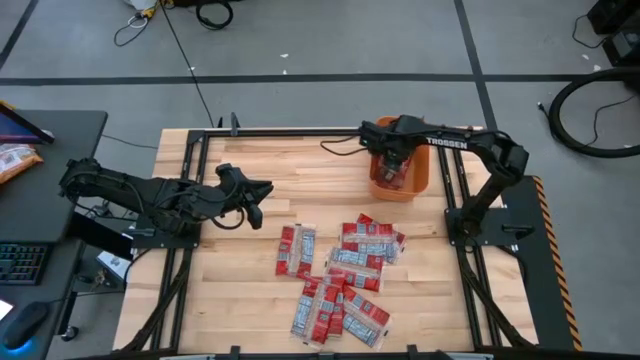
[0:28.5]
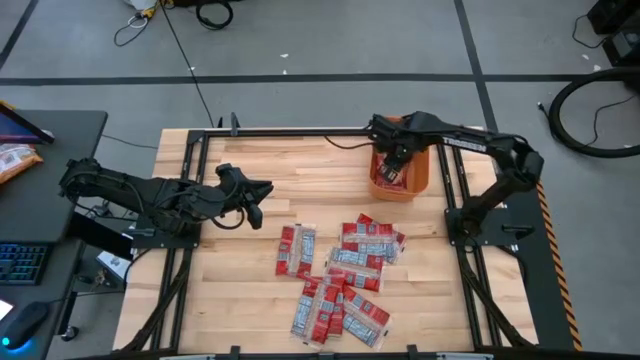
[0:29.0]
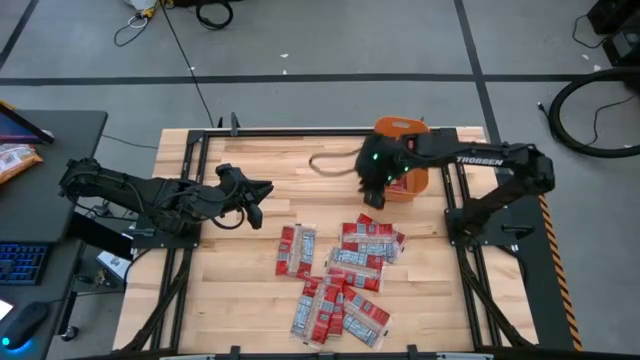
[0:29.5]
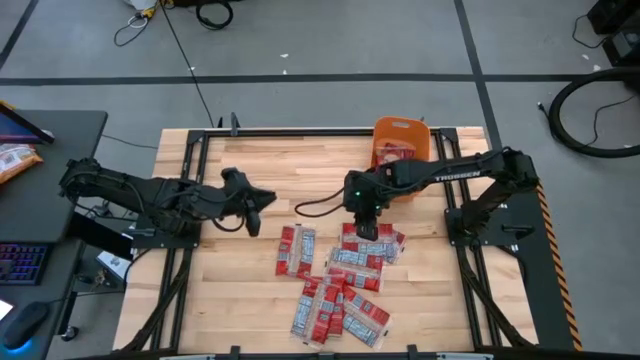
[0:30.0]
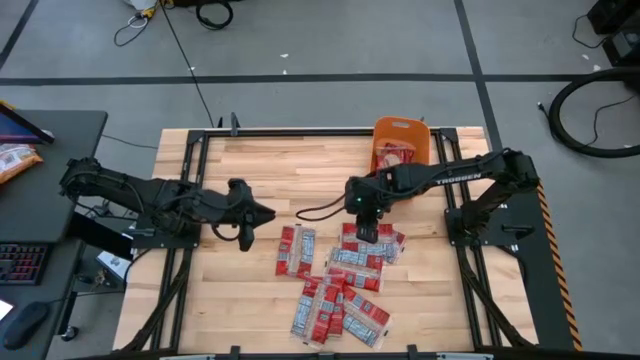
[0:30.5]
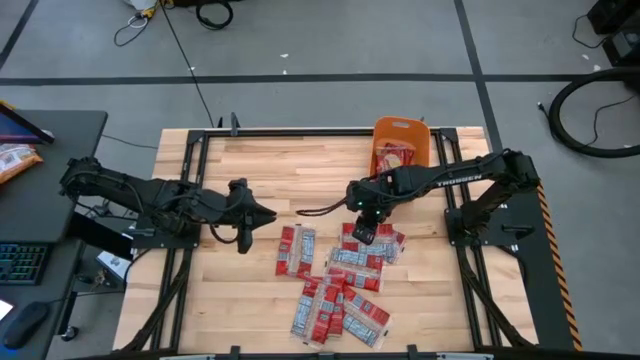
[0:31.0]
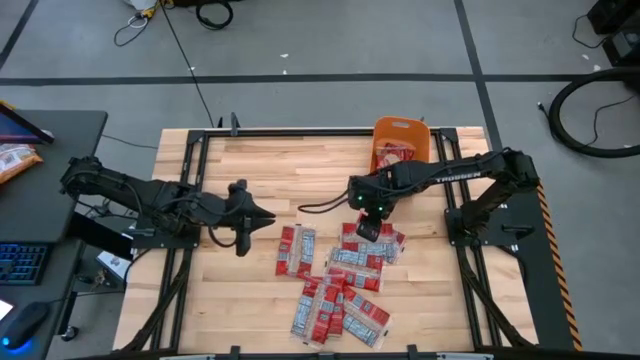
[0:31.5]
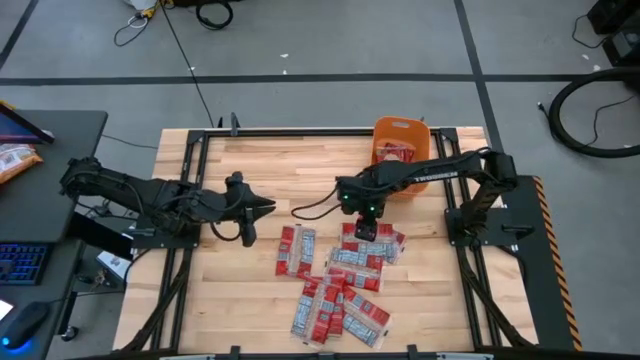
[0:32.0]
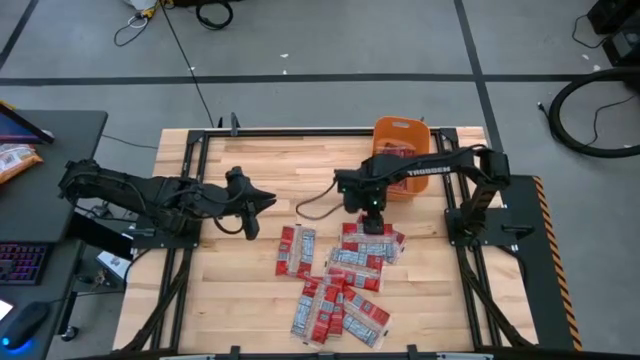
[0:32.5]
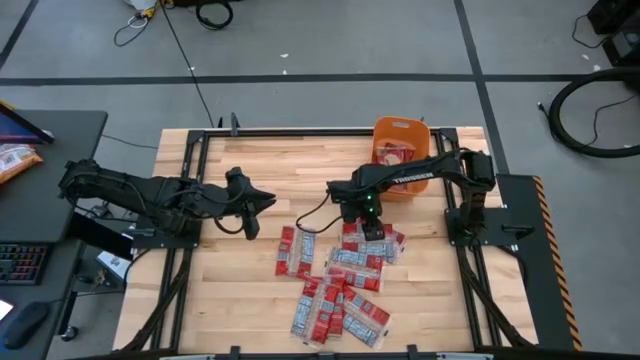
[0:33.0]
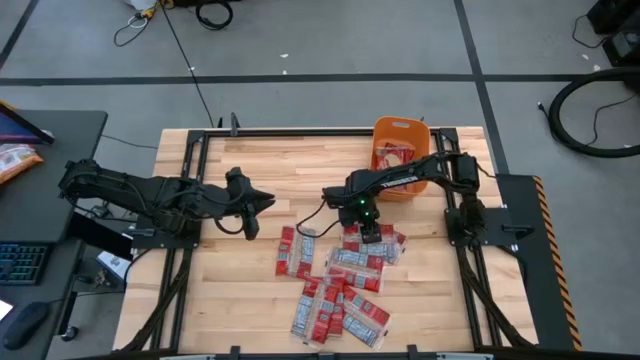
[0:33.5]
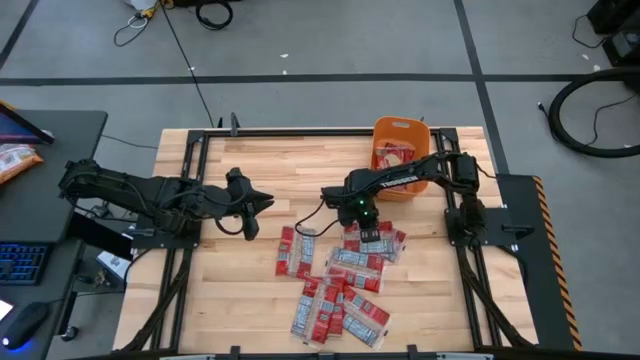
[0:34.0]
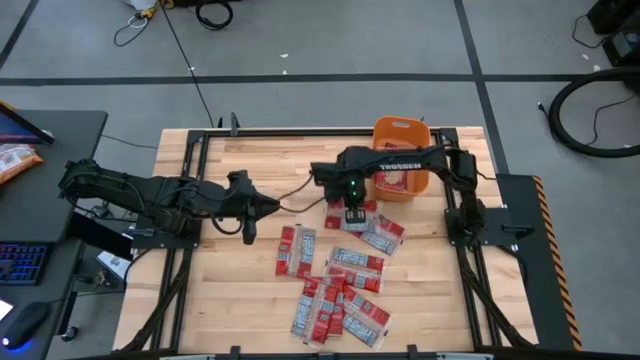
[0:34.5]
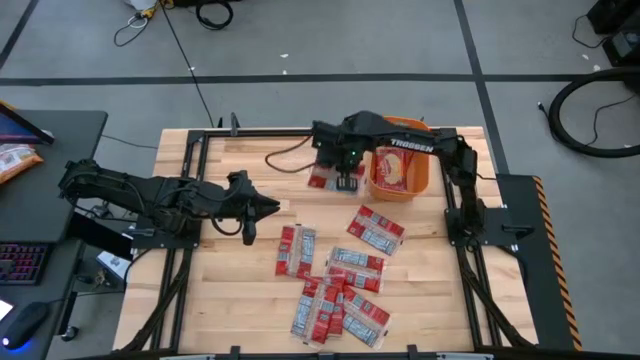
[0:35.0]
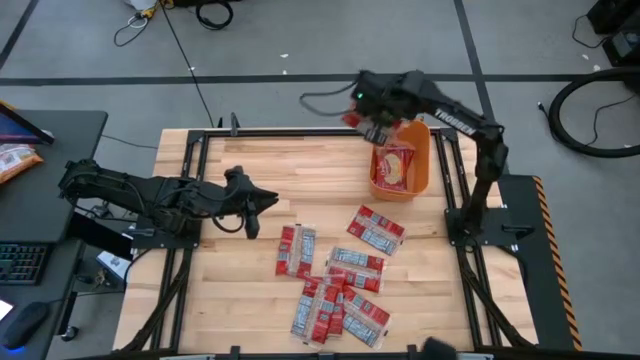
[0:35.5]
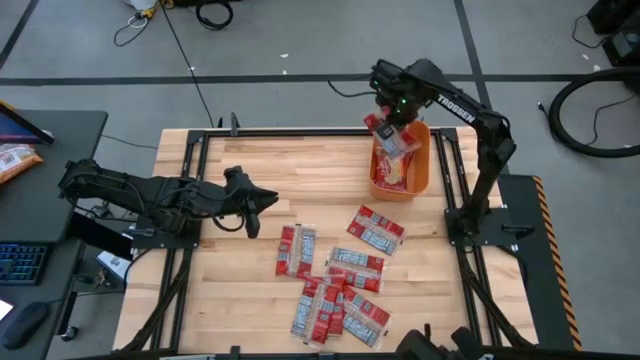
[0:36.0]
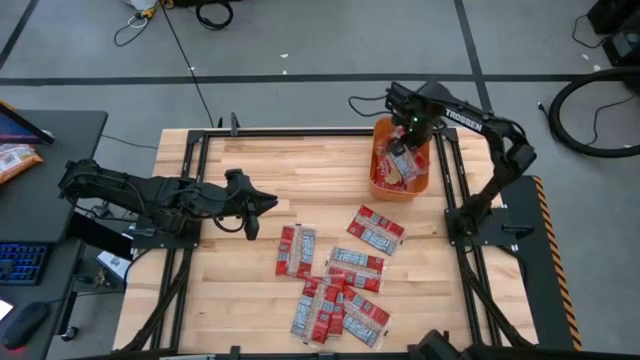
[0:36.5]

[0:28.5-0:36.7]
Task: Sort popcorn bags into baskets
Put the red popcorn bag into the orange bin

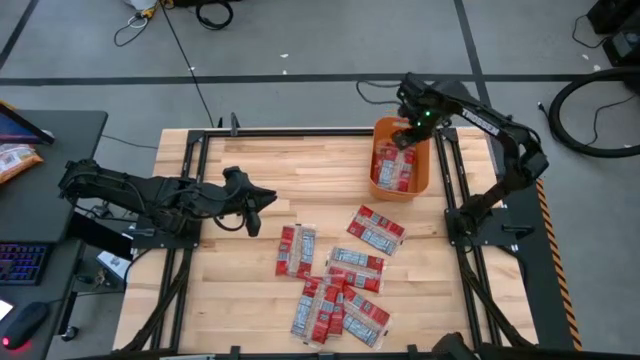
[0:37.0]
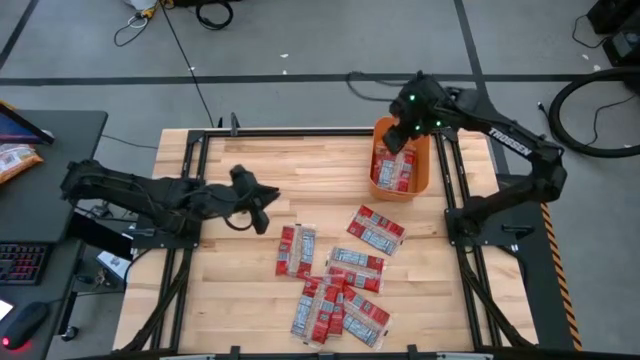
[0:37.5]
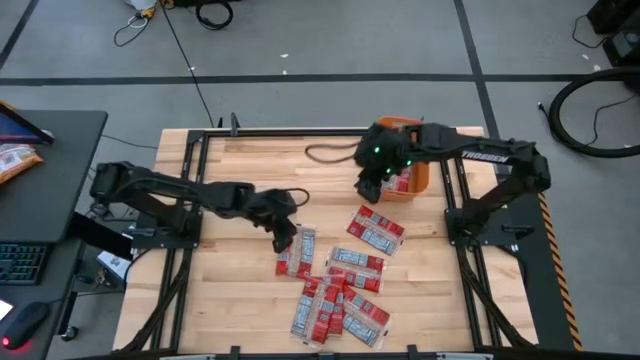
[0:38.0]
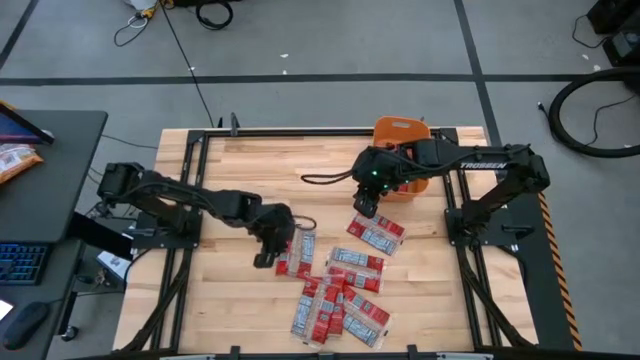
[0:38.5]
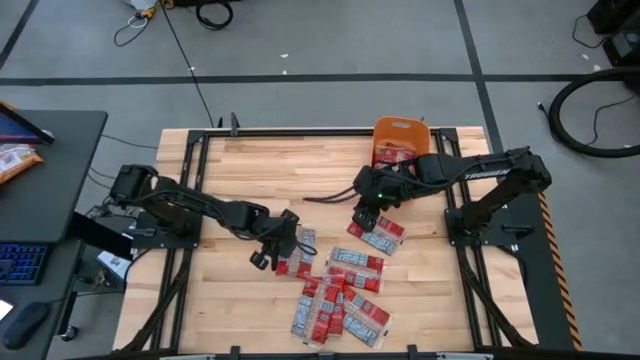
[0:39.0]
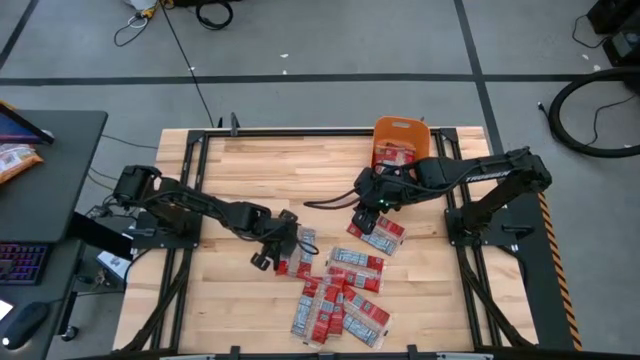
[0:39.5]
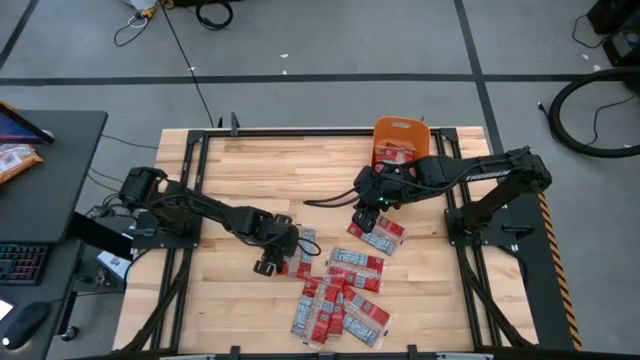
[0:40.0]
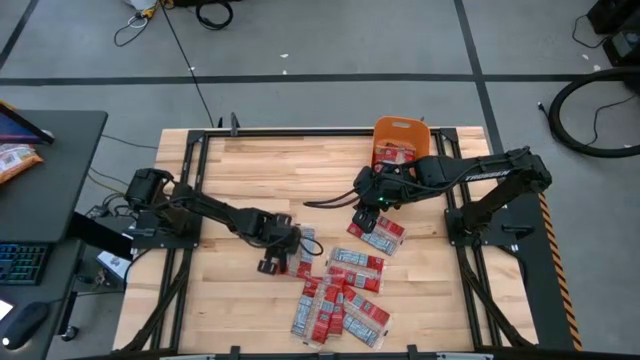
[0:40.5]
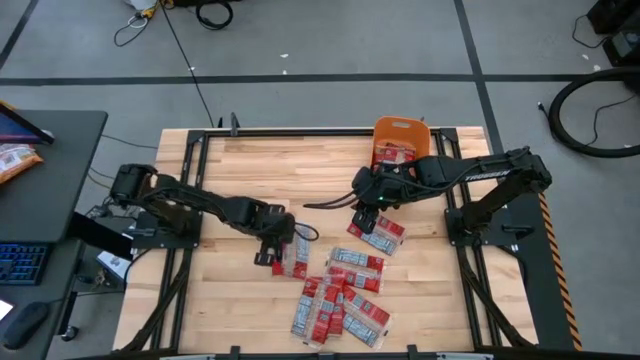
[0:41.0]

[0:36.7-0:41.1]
Put the red popcorn bag into the orange bin

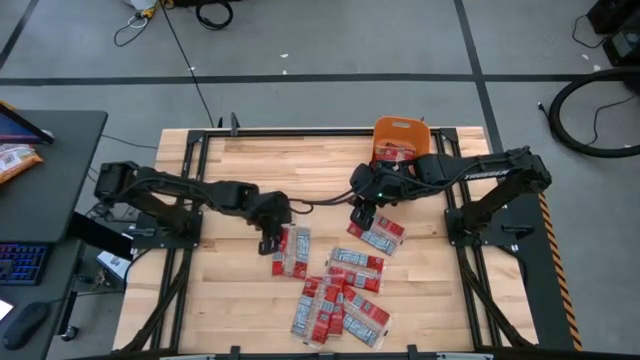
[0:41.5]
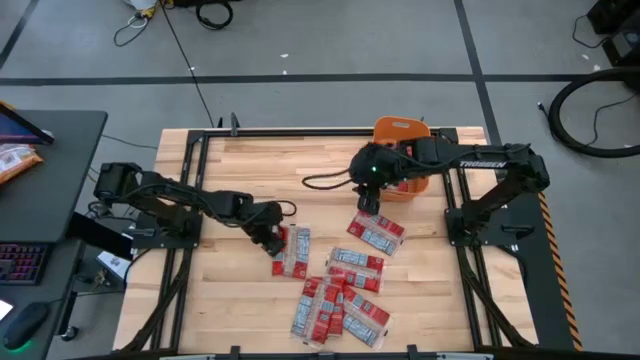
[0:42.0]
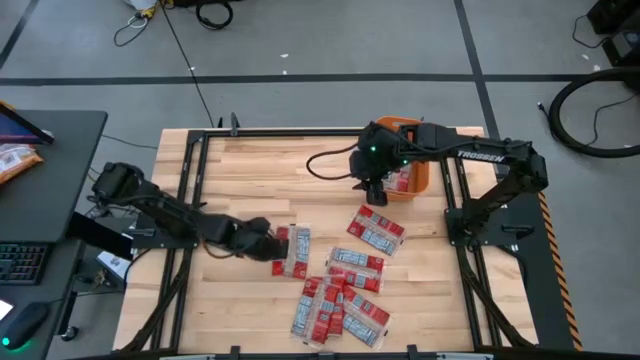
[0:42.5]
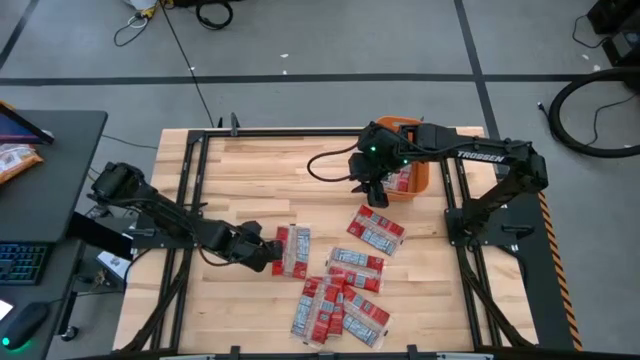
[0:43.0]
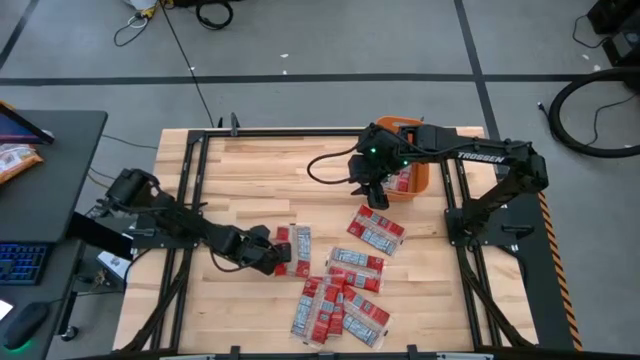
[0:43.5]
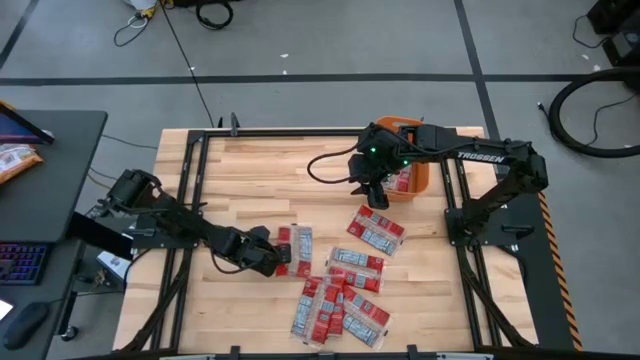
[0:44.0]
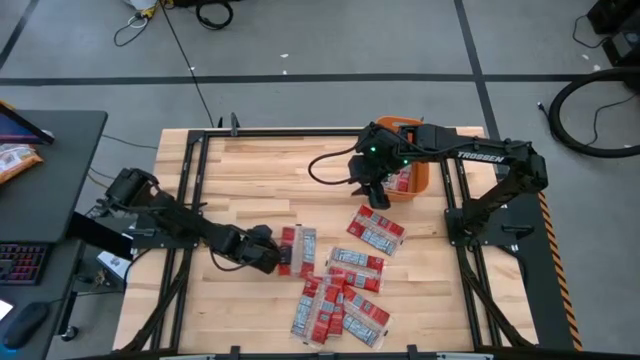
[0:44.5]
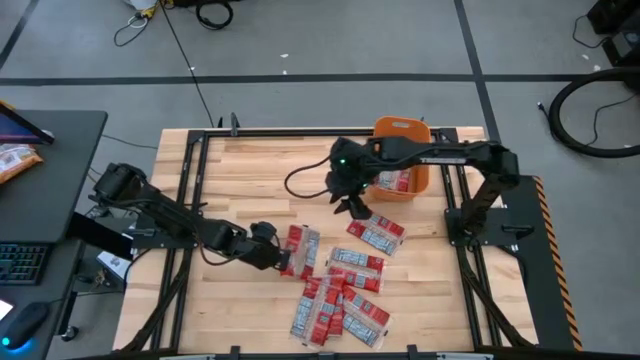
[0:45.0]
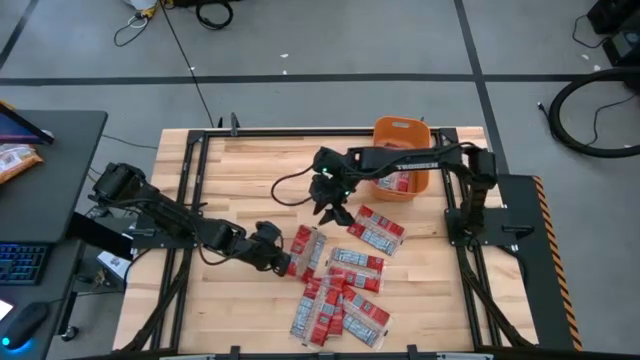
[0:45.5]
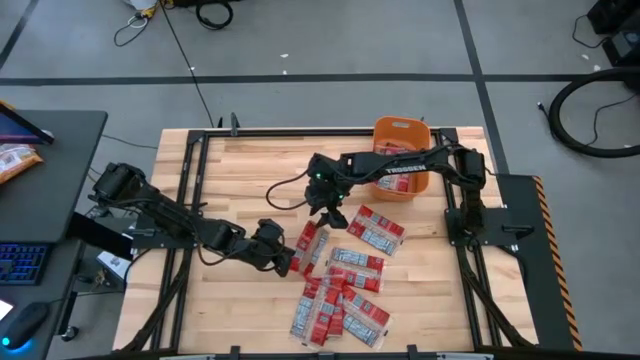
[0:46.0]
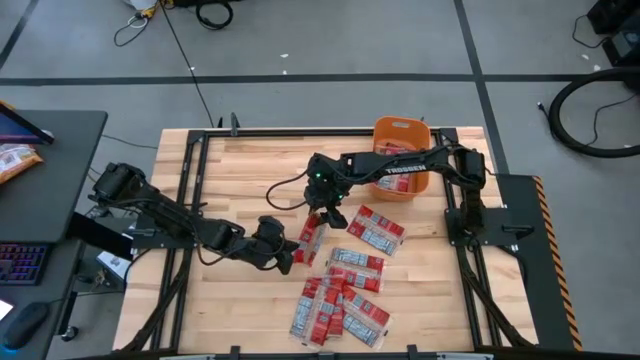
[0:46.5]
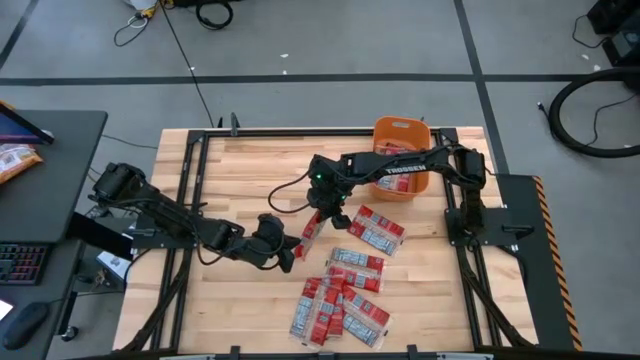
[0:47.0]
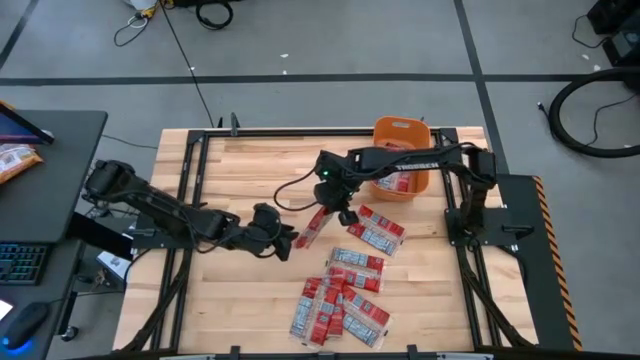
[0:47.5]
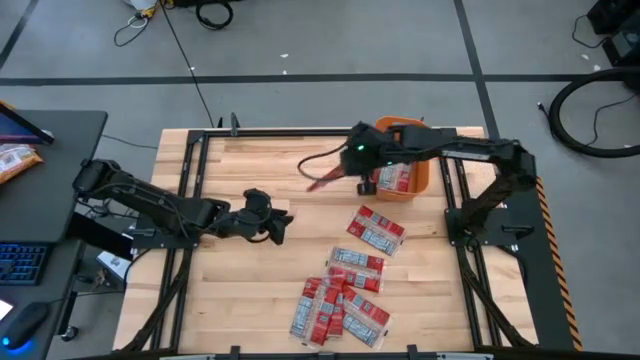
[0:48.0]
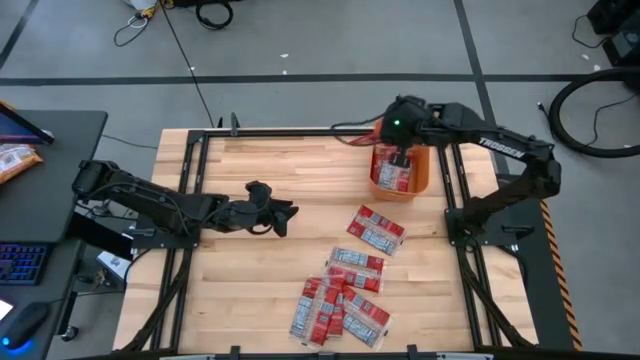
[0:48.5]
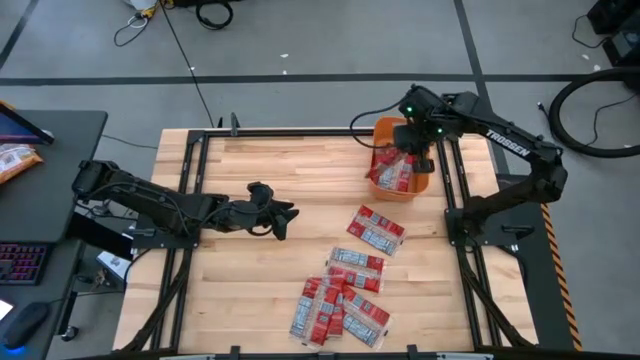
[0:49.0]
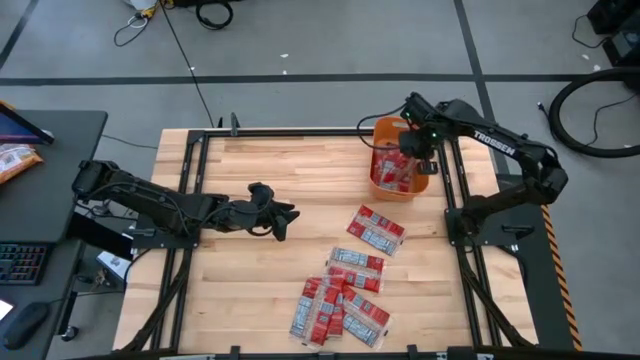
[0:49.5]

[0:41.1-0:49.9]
Put the red popcorn bag into the orange bin

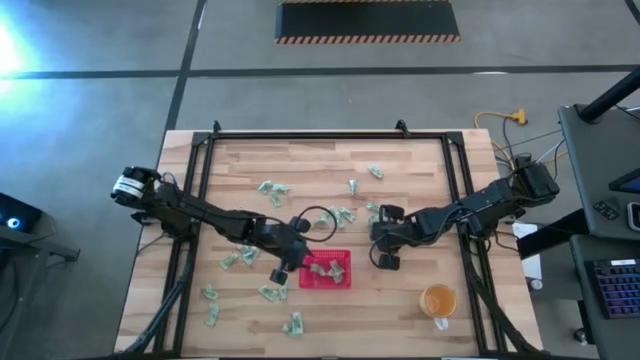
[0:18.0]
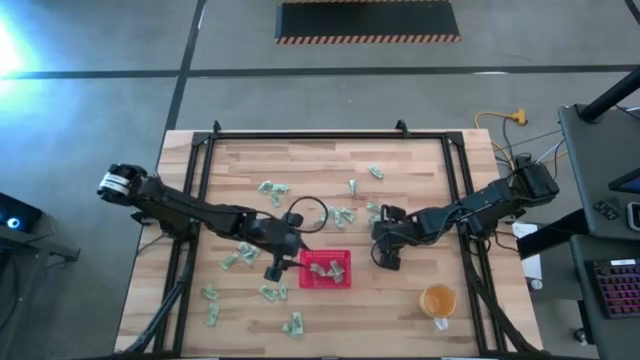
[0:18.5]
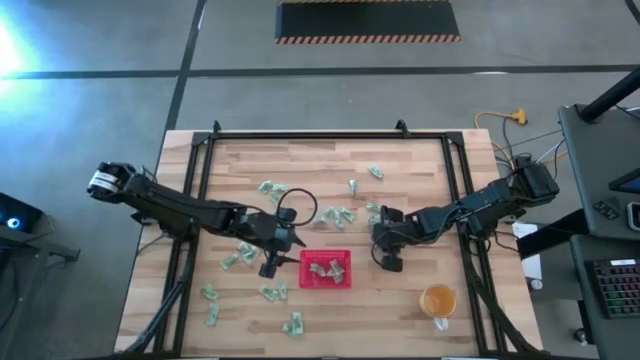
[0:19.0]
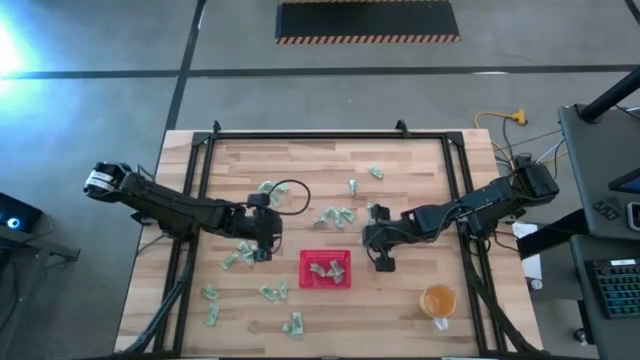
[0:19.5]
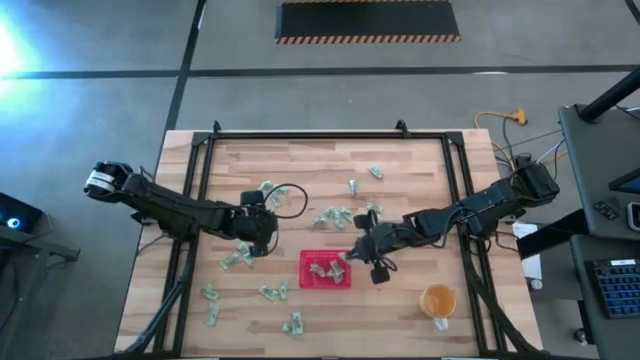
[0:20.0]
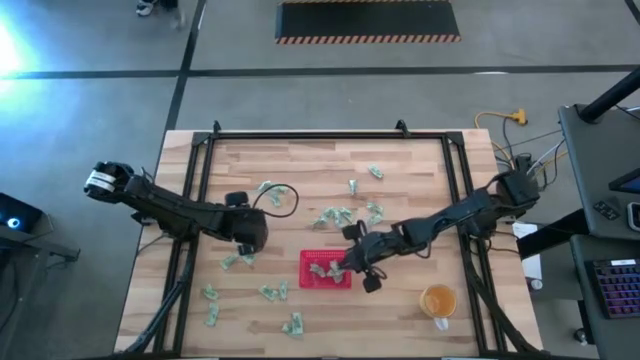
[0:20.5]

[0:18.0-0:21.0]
Task: Pick and place Stevia / Truvia into bins
Put the white stevia packet into the red bin
